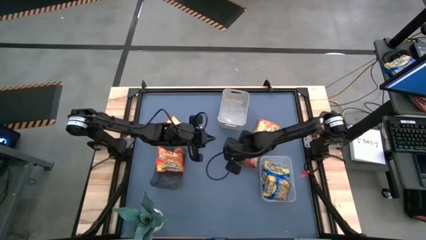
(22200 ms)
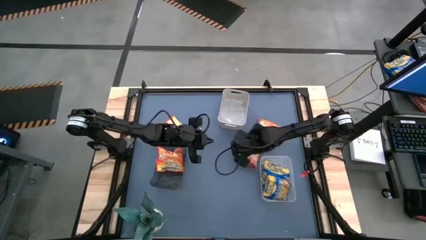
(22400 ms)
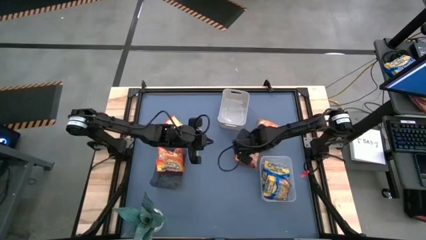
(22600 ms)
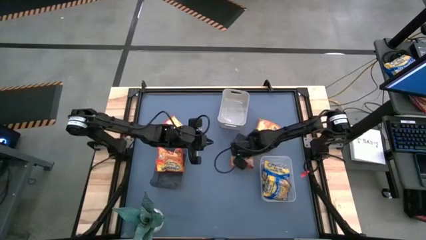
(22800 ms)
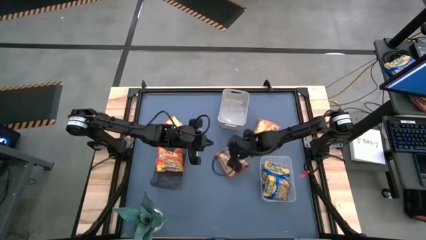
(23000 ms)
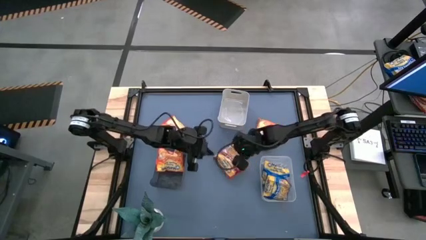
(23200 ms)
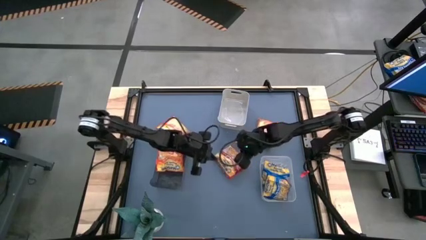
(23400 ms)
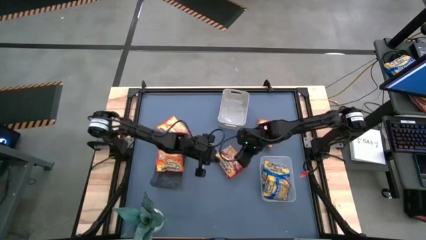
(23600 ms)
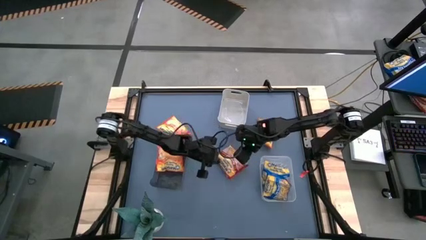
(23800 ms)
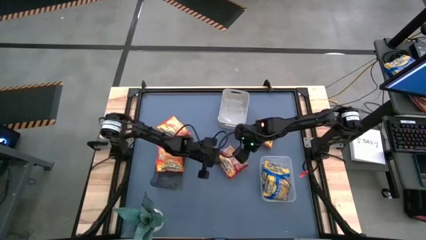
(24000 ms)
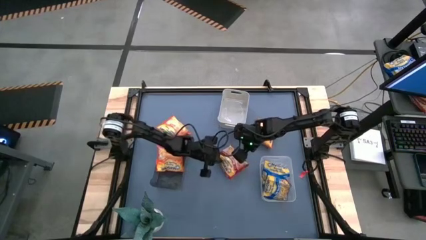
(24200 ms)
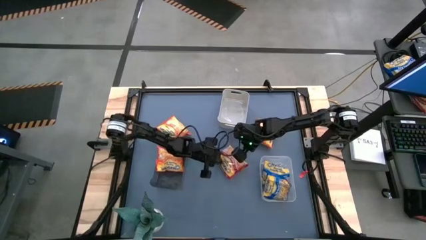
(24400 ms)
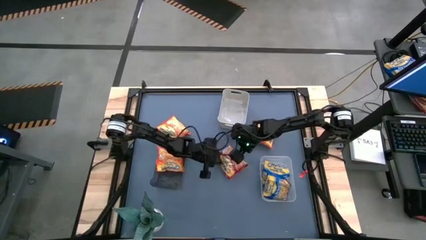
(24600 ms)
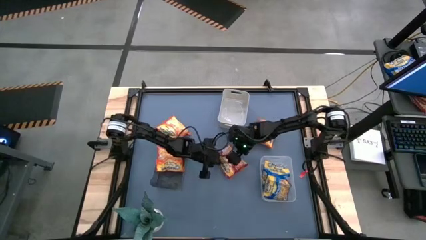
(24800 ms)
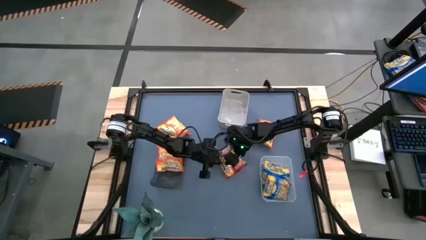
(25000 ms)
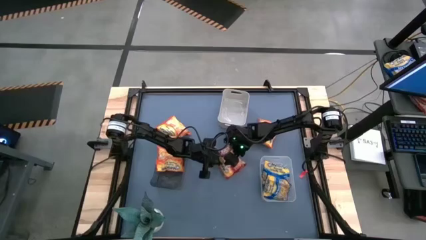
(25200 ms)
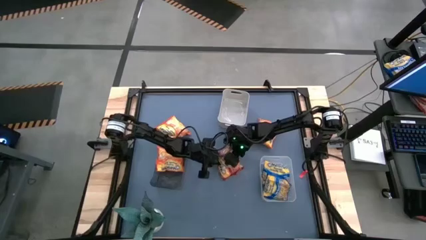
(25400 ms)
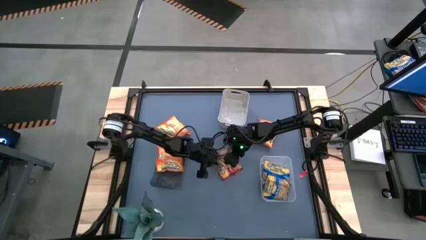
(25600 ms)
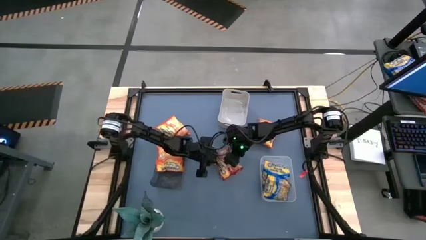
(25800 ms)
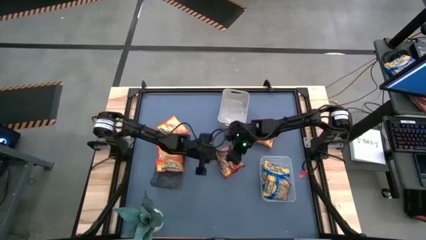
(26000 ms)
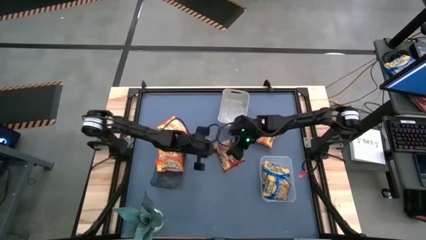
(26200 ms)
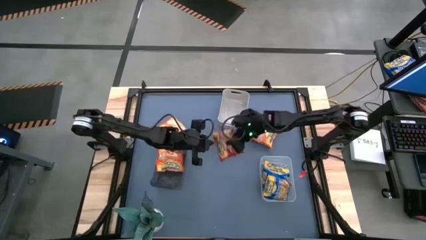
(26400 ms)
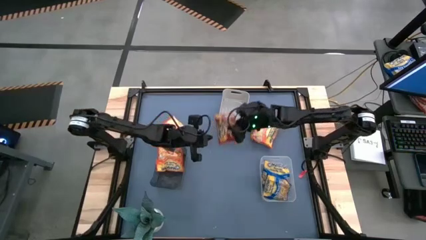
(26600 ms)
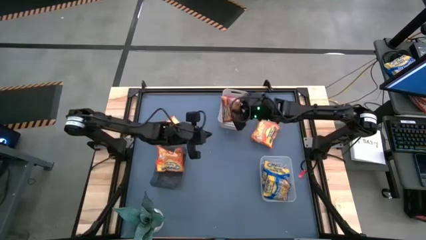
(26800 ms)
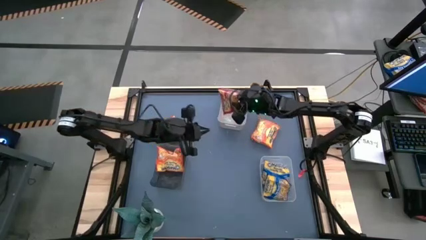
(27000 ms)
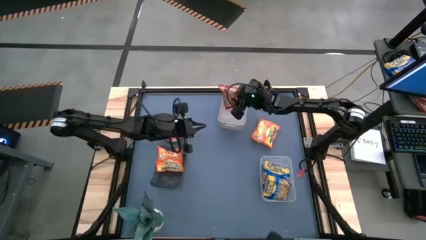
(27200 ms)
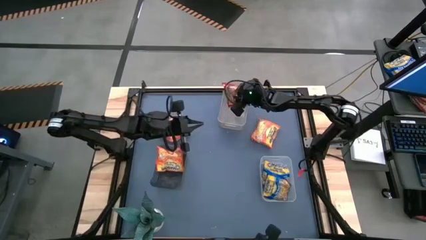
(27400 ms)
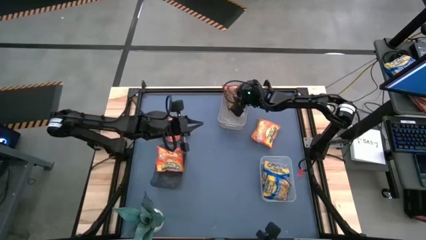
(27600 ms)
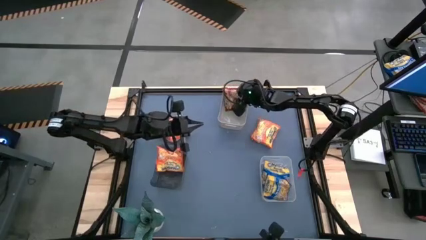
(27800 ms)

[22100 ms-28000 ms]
Task: Sort Maruchan noodles
Put the red noodle pack into the gray bin

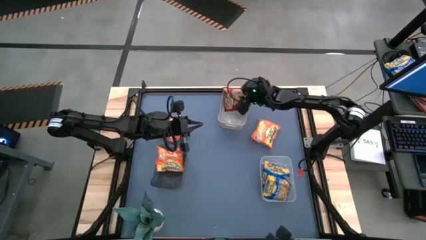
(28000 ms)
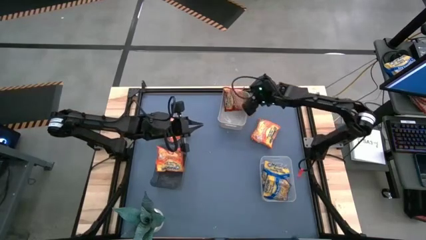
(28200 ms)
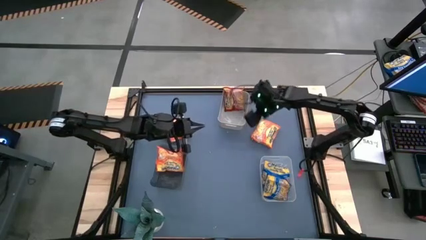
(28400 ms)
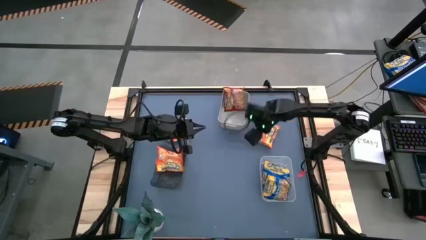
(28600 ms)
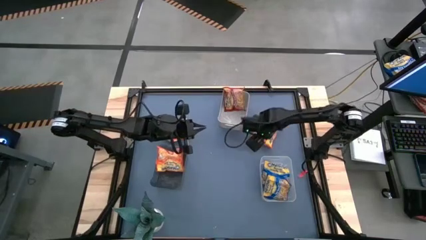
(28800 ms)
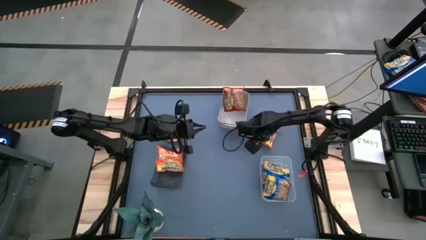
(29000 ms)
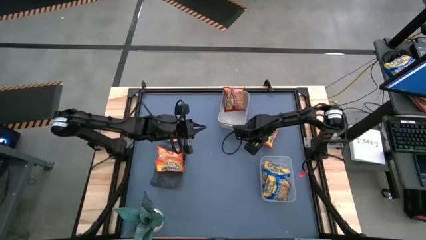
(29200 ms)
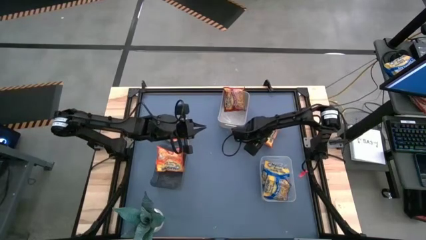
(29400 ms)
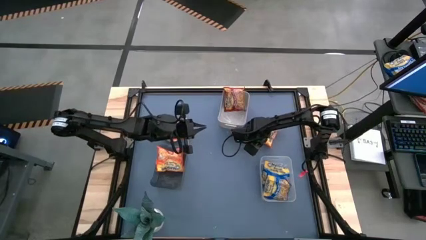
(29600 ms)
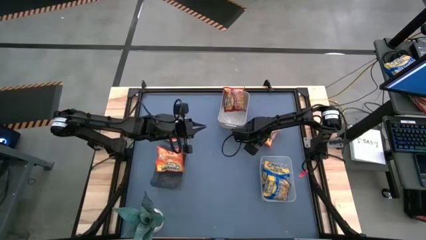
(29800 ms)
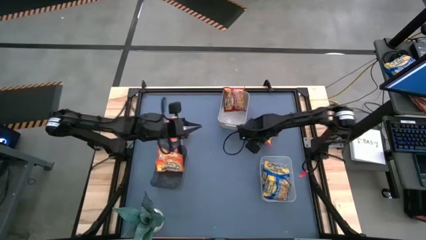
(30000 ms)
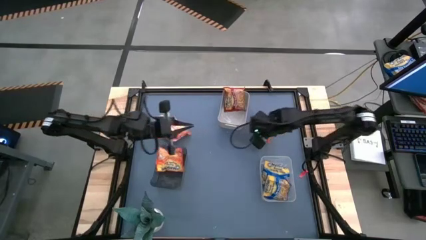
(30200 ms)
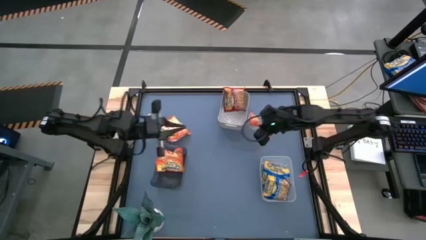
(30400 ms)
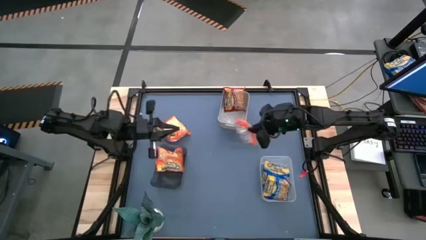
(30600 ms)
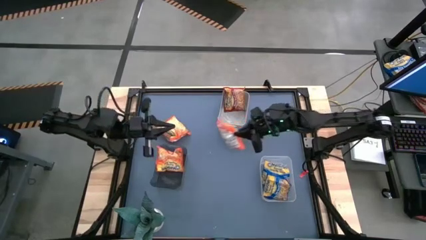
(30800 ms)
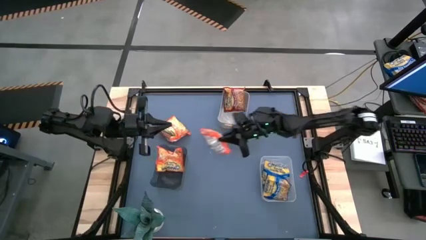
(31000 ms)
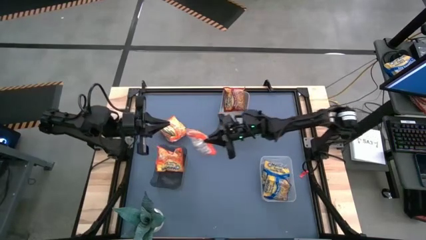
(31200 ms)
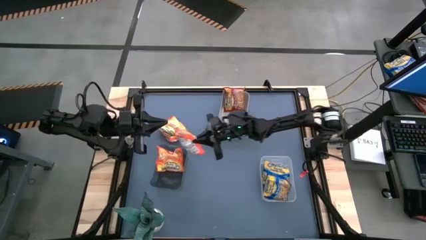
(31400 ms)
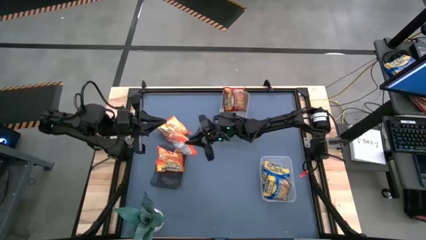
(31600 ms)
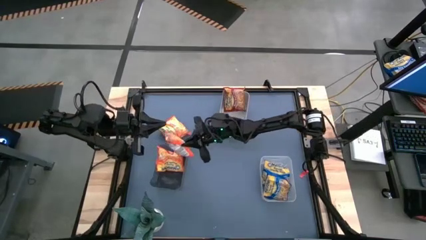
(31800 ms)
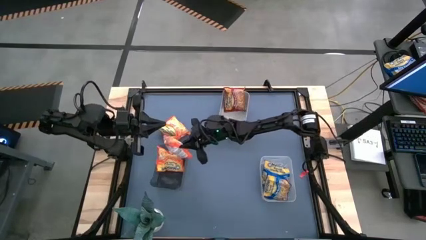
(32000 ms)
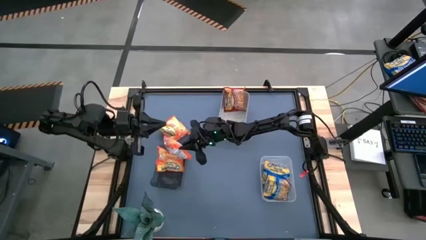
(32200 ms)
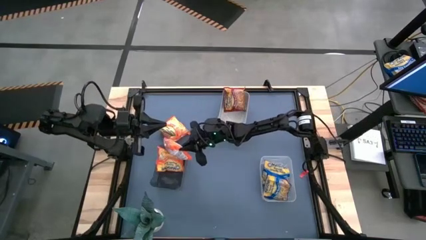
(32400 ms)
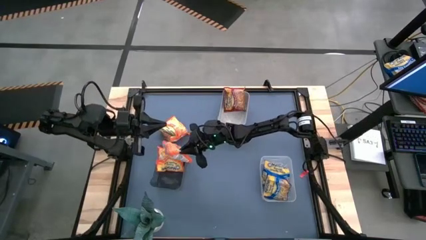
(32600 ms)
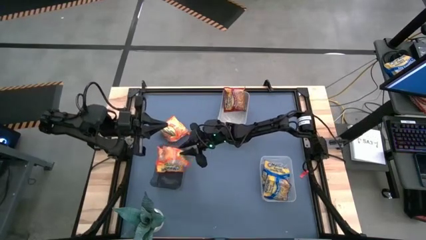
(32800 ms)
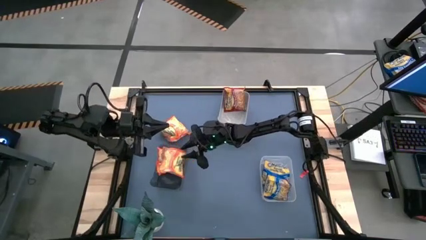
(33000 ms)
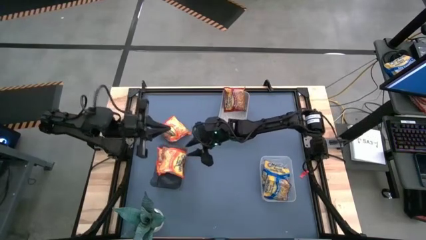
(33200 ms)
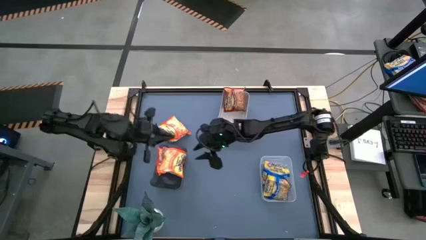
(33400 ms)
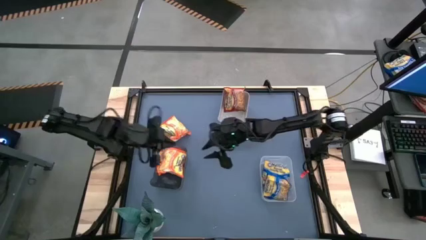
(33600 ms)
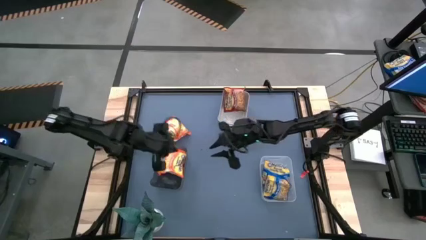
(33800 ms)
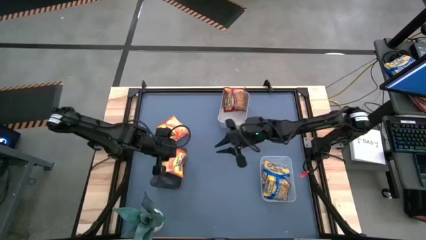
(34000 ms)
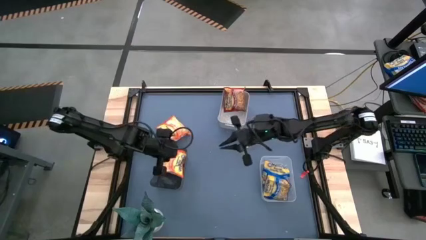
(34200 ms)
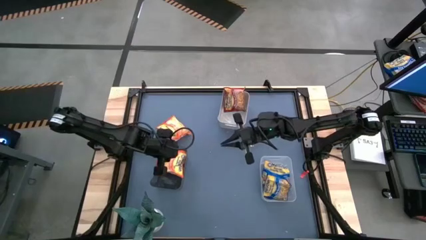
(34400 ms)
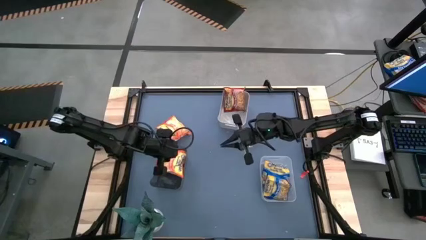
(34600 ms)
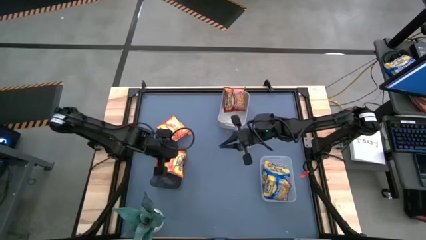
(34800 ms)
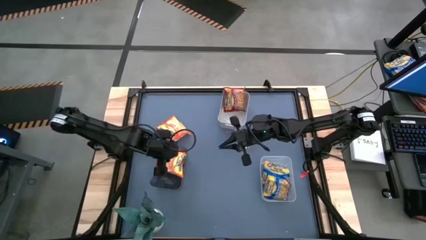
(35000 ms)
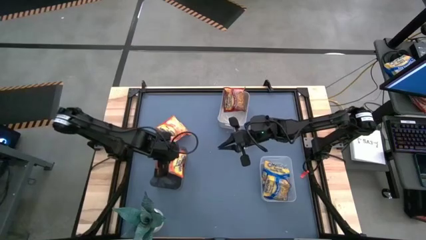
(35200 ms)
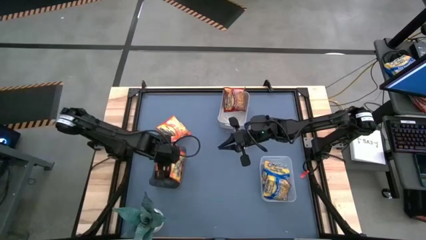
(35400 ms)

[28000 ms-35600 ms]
Put the right orange noodle pack into the black bin

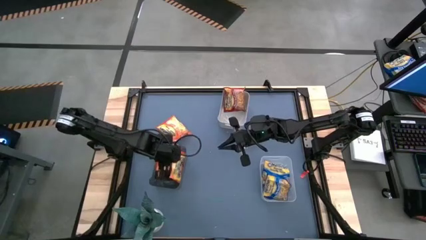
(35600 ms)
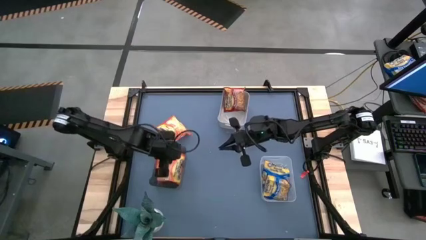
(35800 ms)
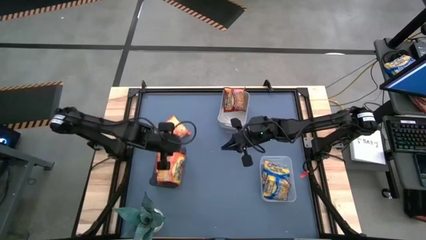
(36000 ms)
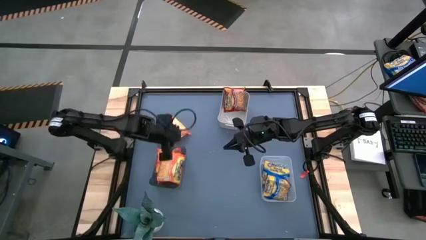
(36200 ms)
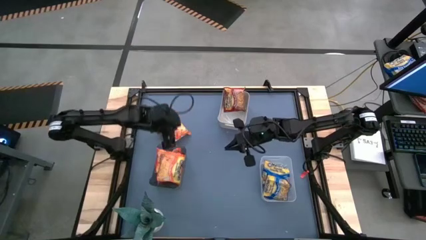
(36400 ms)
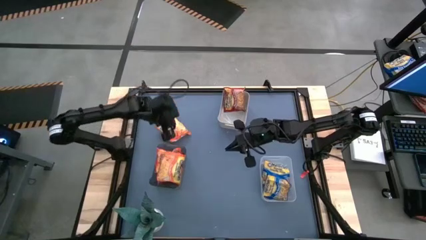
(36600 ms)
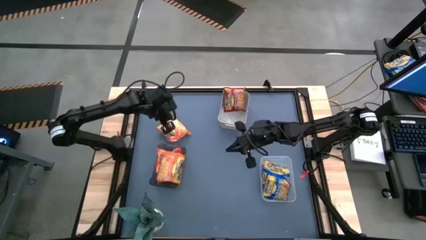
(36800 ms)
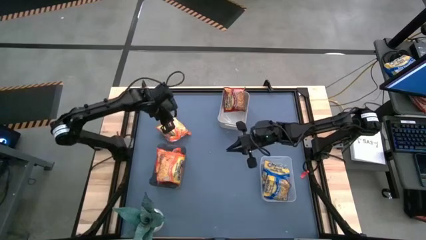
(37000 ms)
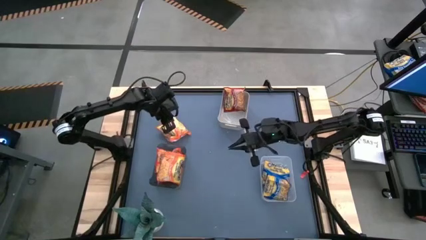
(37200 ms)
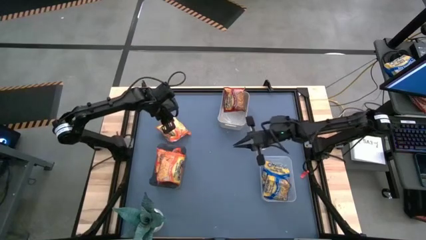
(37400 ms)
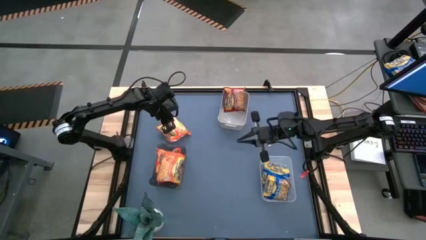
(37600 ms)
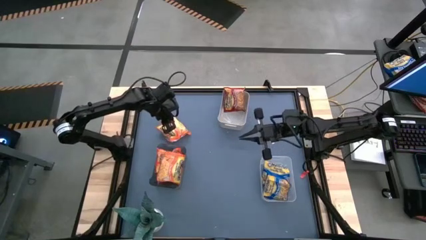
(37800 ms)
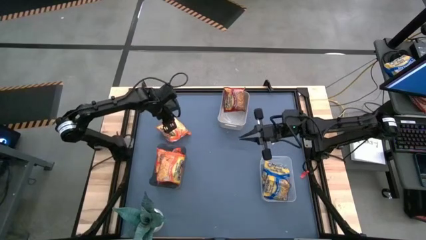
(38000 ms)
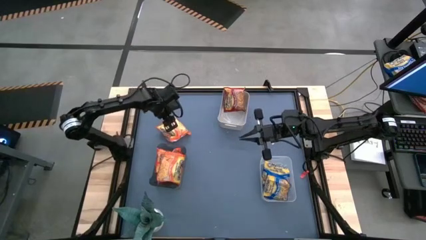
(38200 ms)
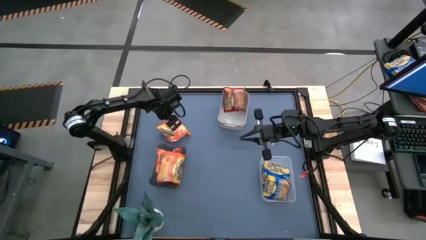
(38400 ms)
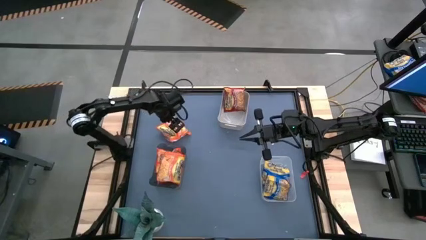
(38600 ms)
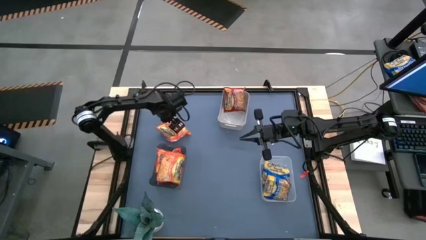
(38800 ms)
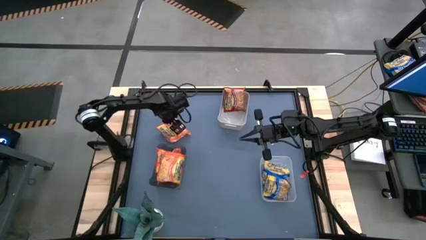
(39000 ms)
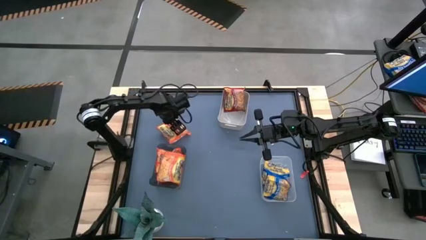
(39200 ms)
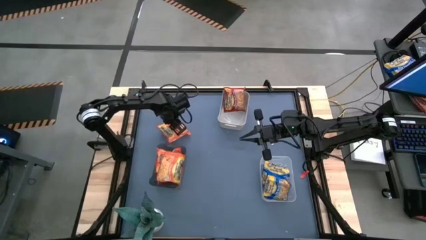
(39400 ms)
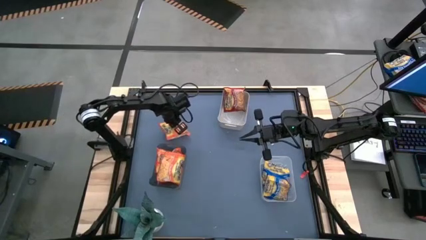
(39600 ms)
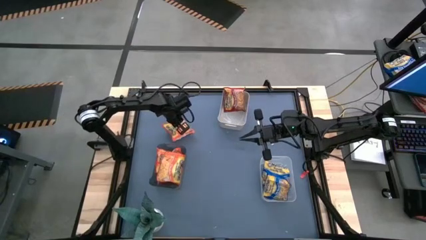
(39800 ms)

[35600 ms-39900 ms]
Put the orange noodle pack into the black bin
